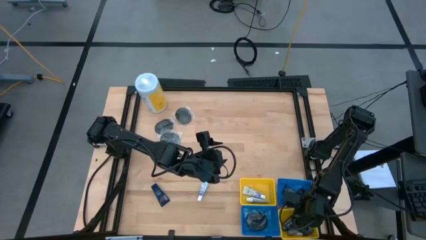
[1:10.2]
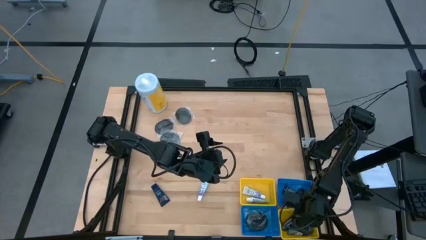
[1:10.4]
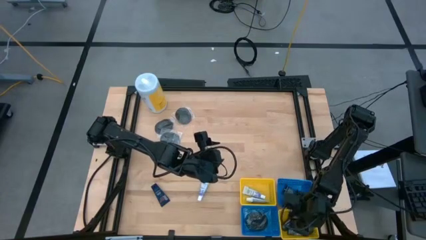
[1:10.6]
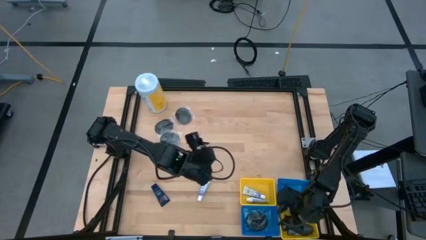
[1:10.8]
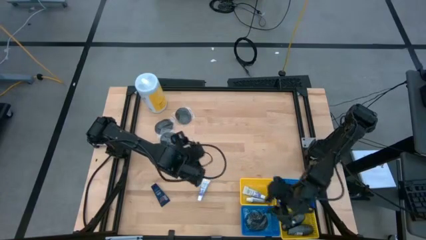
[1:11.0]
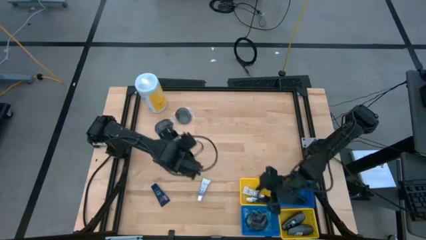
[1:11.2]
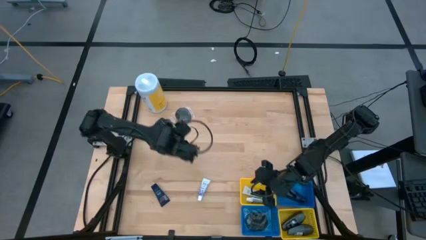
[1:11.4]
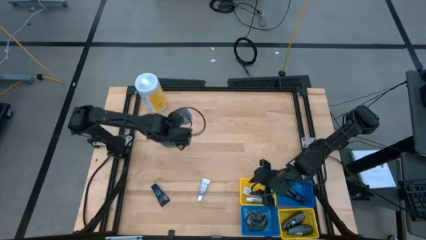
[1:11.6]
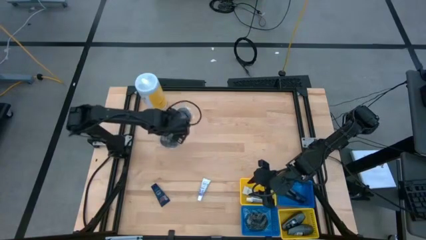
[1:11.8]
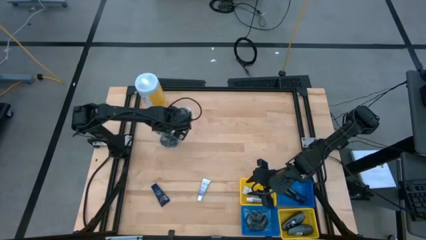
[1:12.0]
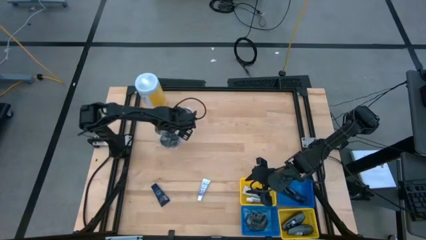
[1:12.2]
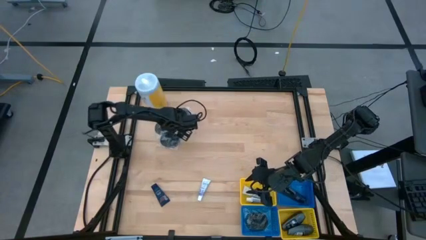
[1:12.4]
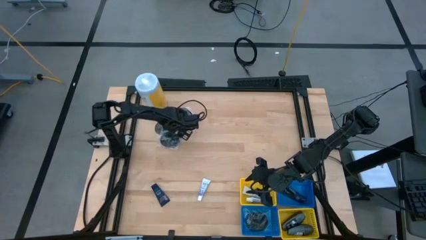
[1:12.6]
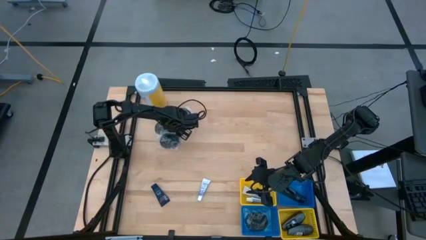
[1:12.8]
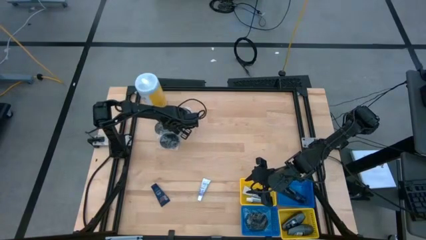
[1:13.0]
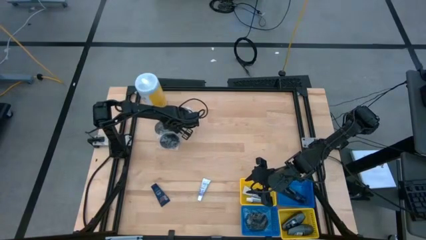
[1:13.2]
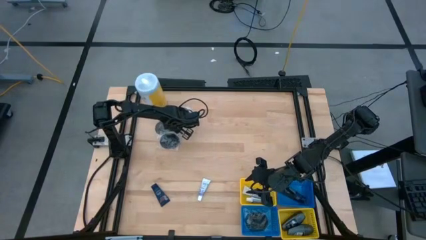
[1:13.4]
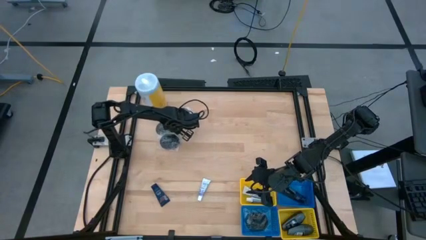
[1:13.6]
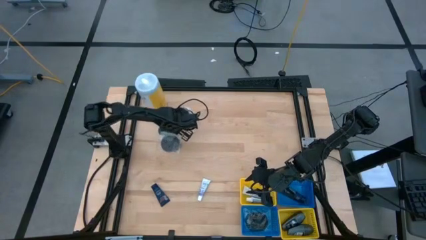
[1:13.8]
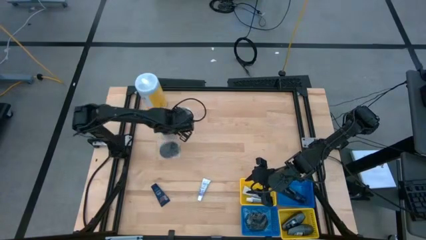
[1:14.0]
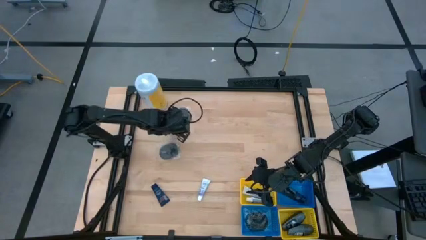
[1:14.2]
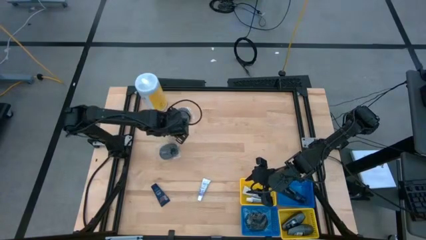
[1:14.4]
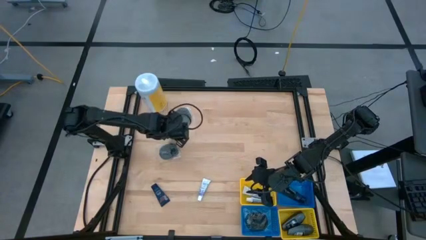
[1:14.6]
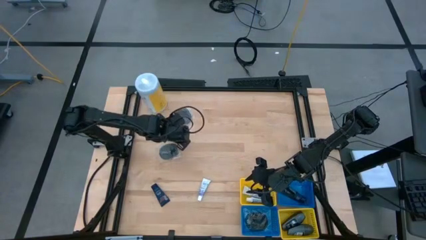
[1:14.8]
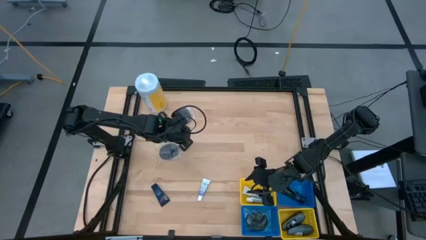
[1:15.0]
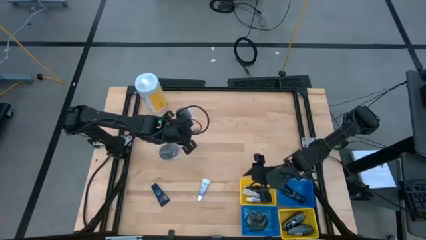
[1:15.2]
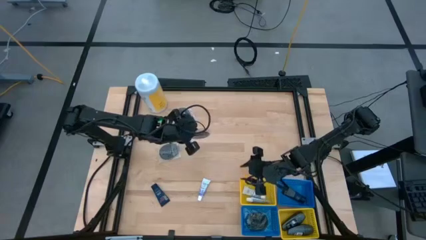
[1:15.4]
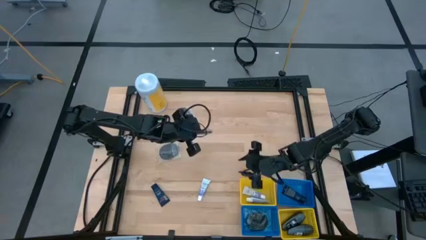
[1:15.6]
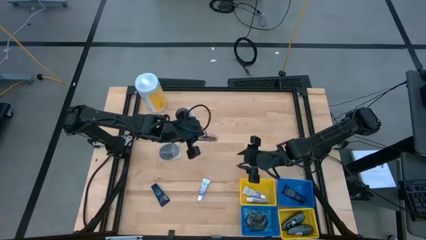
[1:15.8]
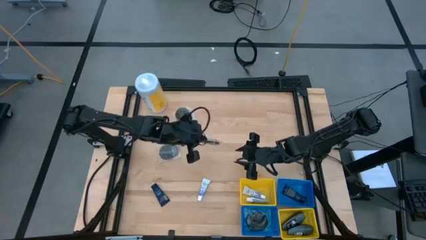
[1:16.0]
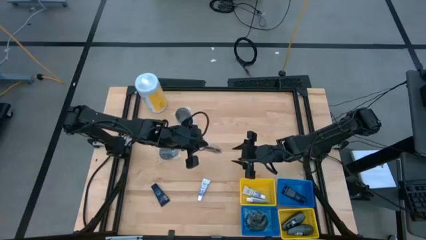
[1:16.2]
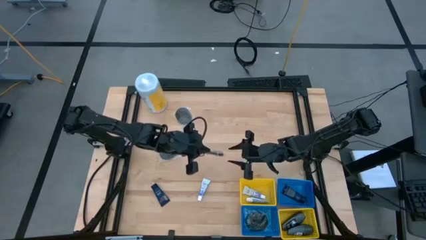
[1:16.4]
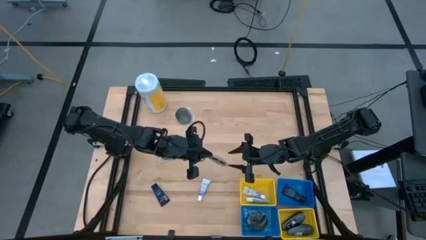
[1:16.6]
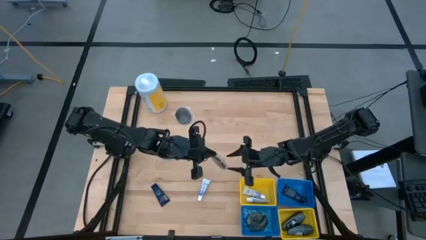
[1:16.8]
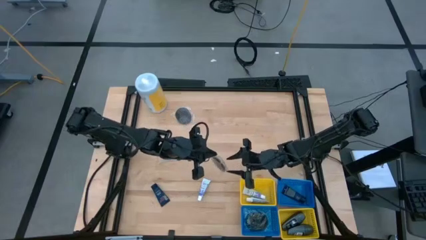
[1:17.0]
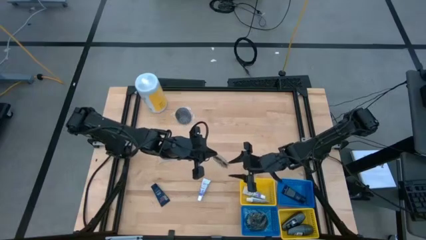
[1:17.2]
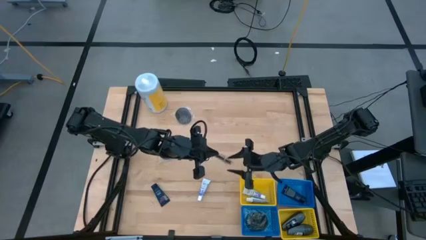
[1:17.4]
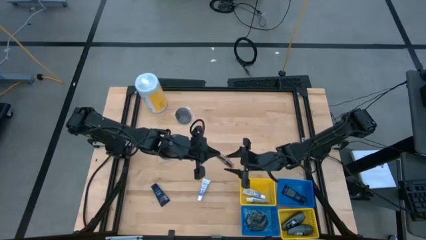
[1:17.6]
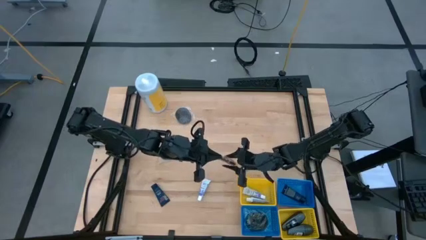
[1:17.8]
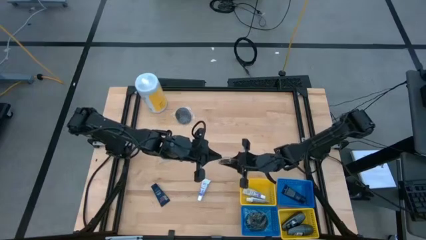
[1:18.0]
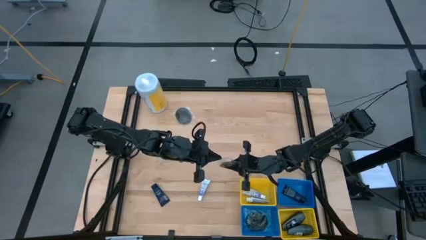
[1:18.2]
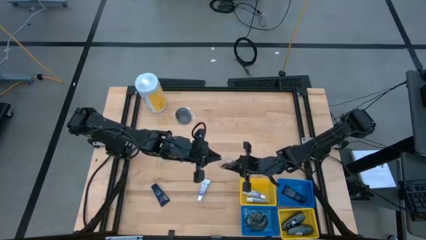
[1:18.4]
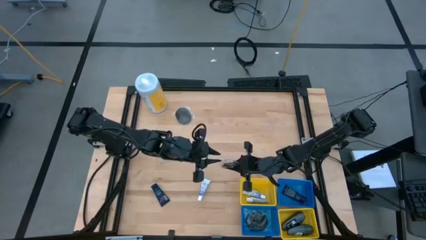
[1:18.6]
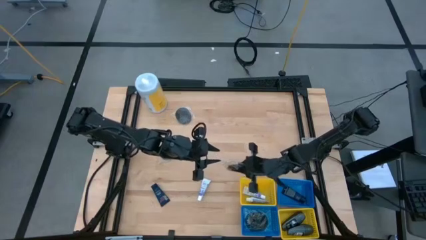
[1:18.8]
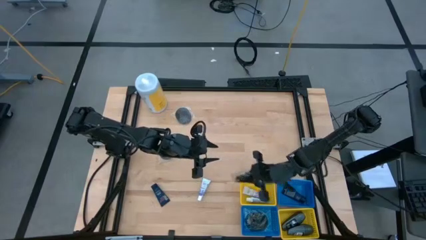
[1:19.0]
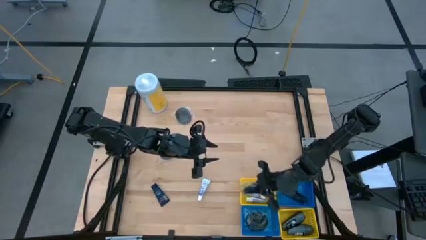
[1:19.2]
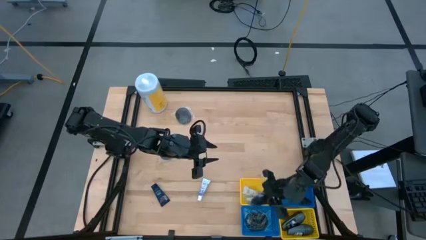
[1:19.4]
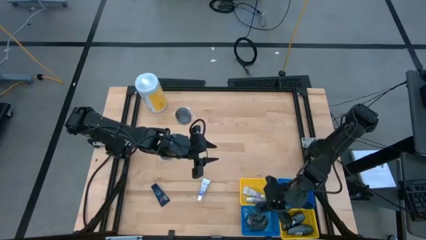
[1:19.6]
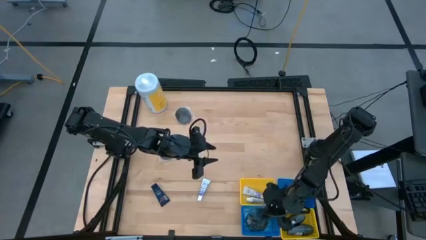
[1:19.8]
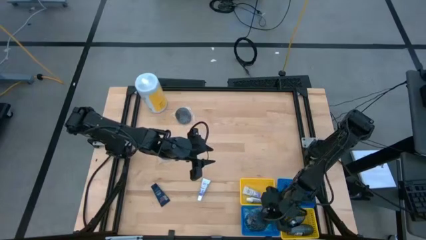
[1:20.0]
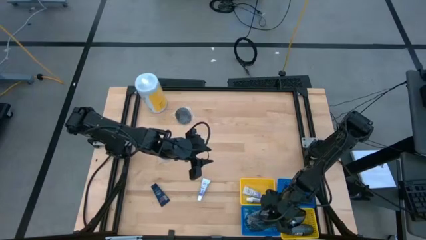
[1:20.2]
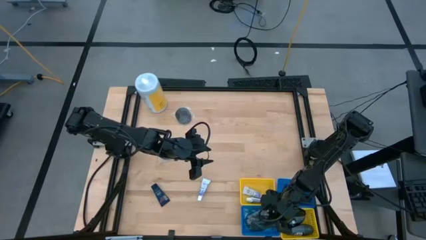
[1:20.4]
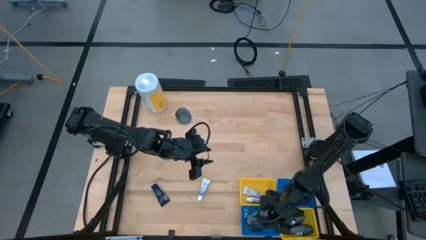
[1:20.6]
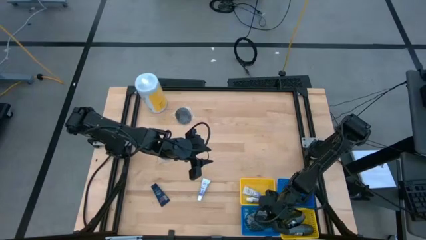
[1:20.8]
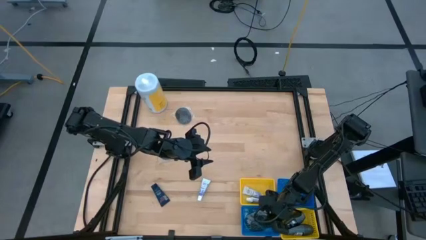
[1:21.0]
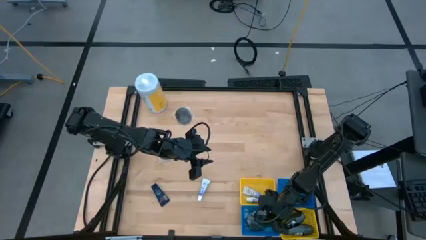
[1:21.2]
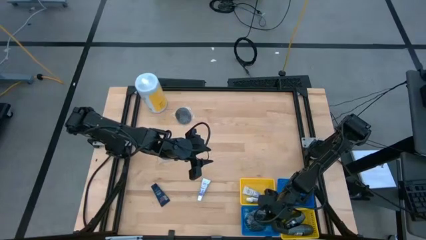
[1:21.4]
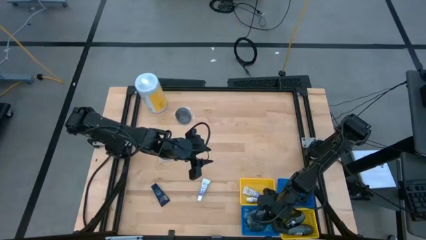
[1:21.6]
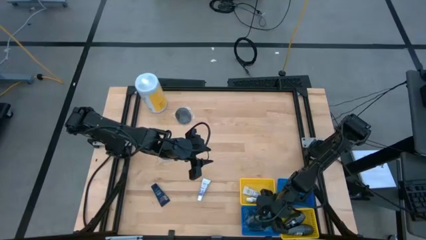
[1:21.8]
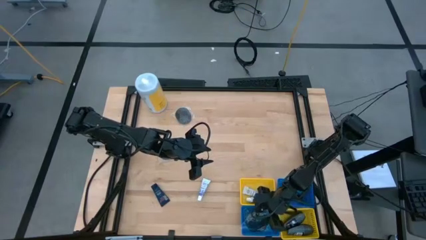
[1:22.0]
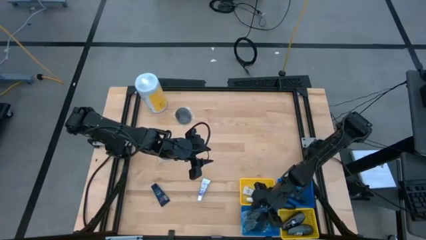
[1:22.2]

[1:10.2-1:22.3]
Task: Pick & Place Travel size toiletries
Put the black hairbrush into the bottom blue bin

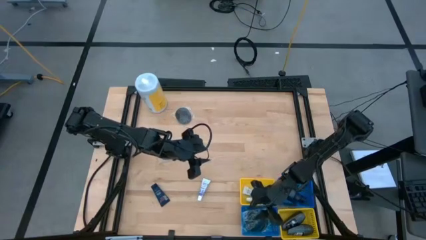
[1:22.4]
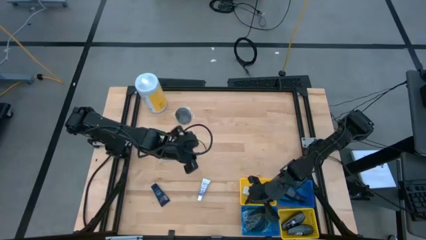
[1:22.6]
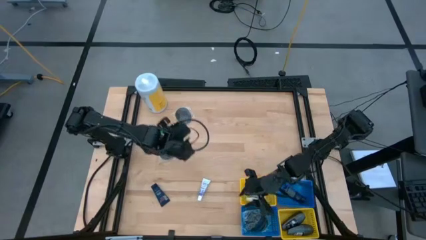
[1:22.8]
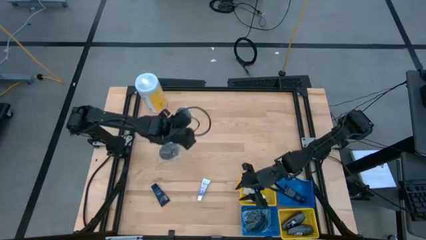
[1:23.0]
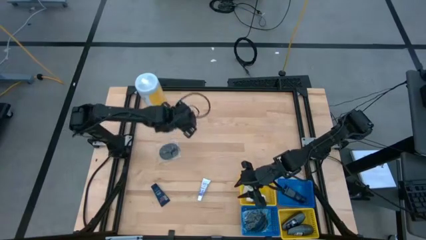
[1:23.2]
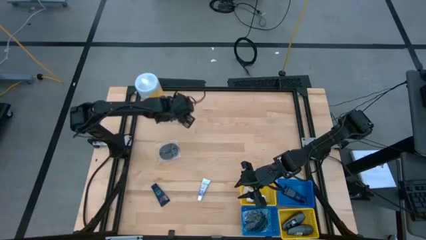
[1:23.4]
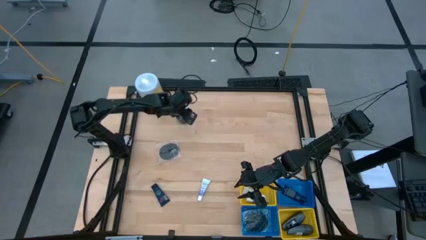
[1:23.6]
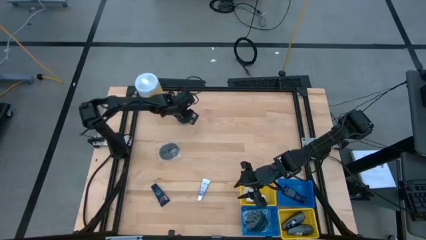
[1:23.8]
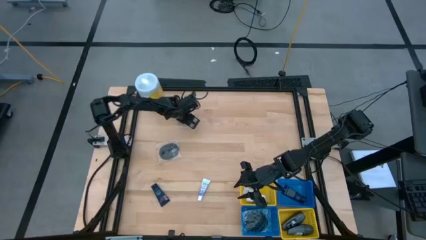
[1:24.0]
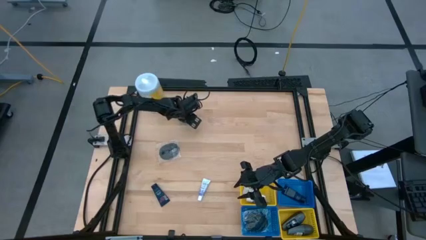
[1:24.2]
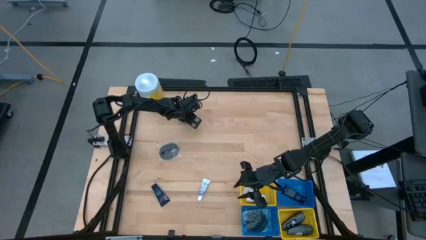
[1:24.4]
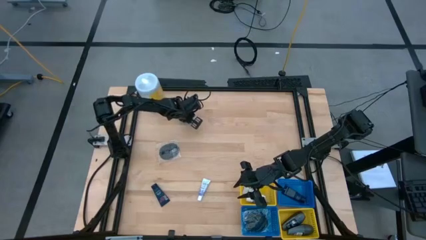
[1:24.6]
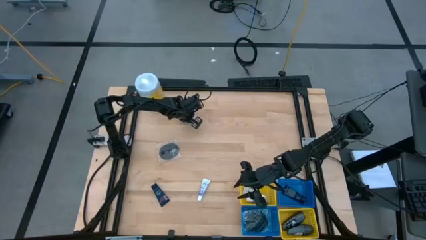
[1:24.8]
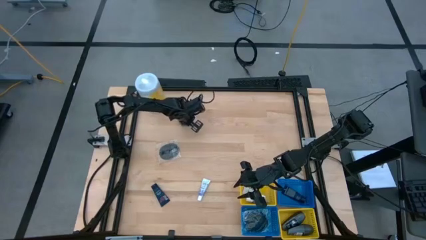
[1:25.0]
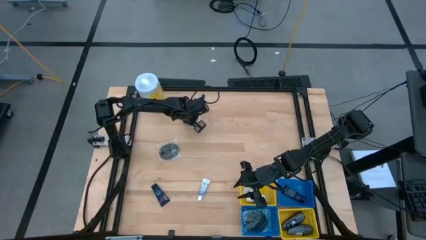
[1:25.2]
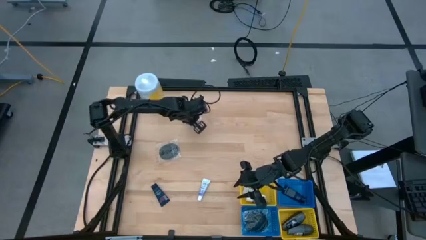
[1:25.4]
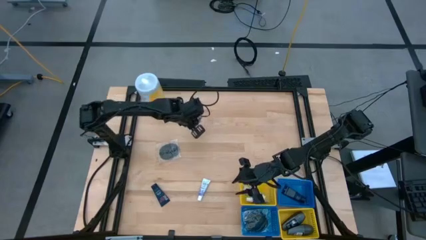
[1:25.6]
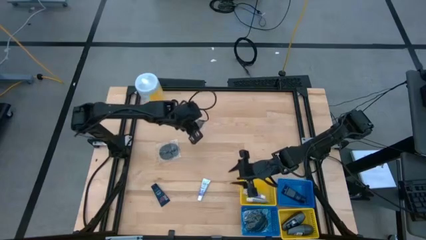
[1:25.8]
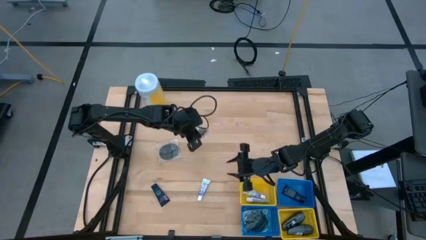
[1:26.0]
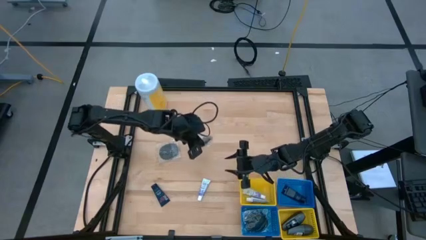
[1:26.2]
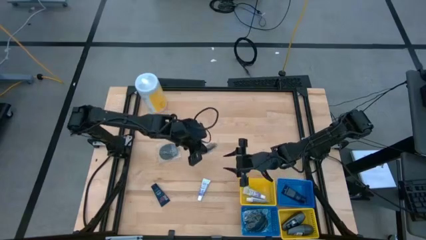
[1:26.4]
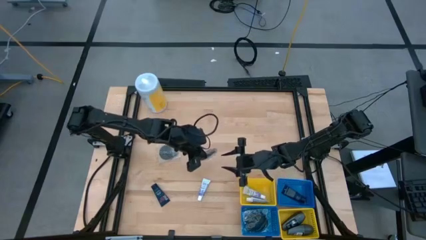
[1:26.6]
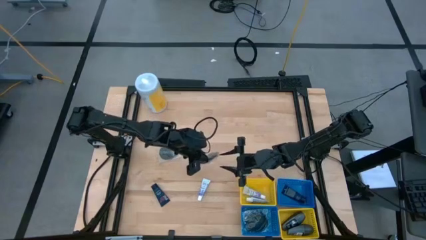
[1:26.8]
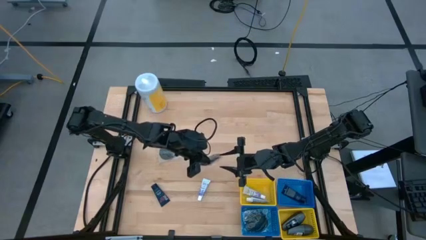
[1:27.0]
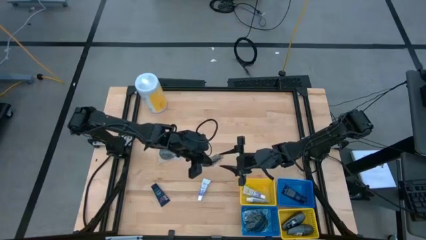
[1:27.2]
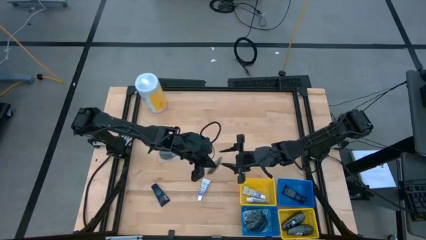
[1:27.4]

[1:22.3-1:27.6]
Put the black hairbrush into the bottom blue bin

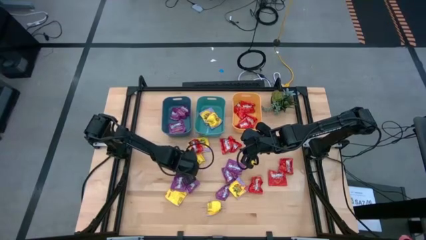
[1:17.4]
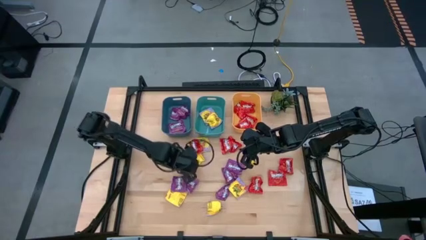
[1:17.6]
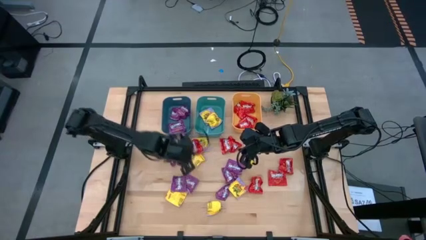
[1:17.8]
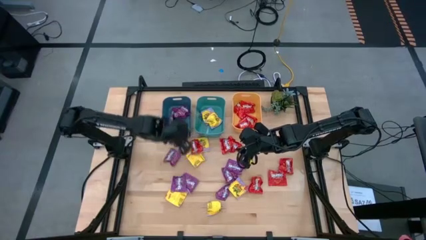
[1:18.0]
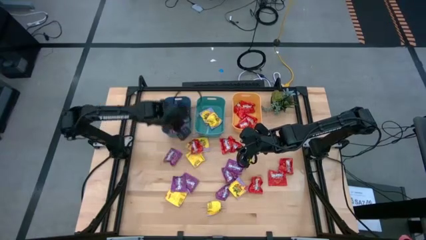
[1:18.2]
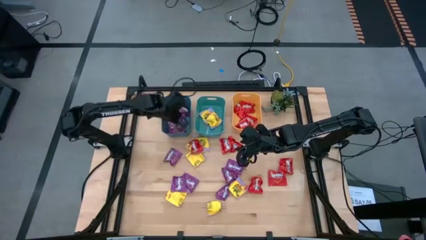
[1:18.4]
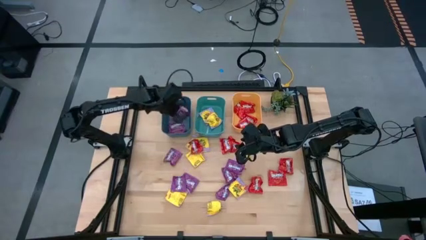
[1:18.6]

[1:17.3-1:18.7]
Task: Sort candy
Put the violet candy into the blue bin
